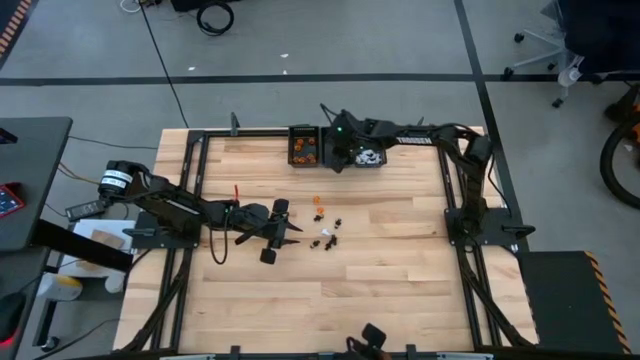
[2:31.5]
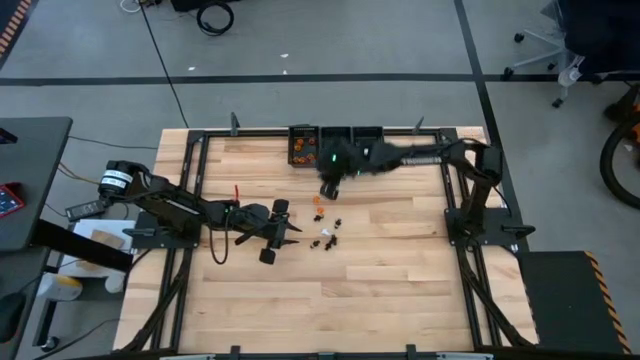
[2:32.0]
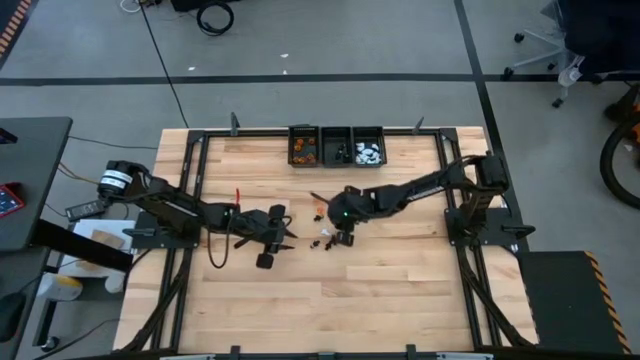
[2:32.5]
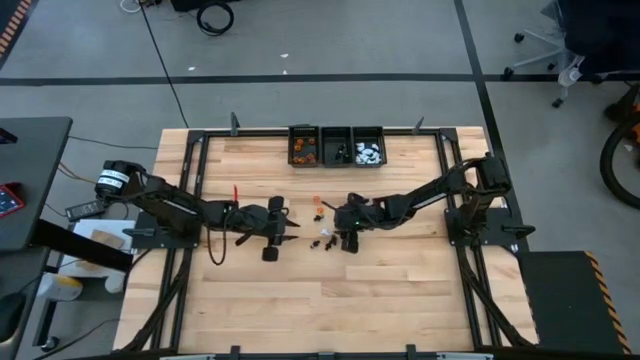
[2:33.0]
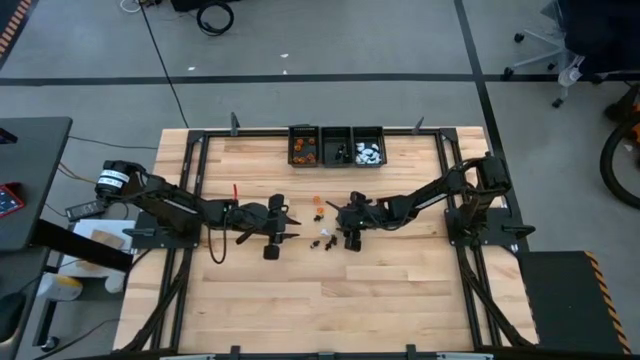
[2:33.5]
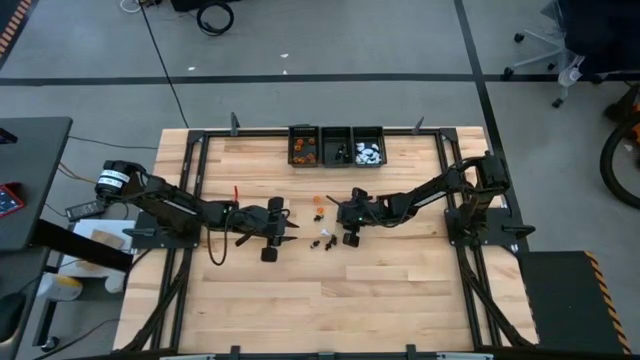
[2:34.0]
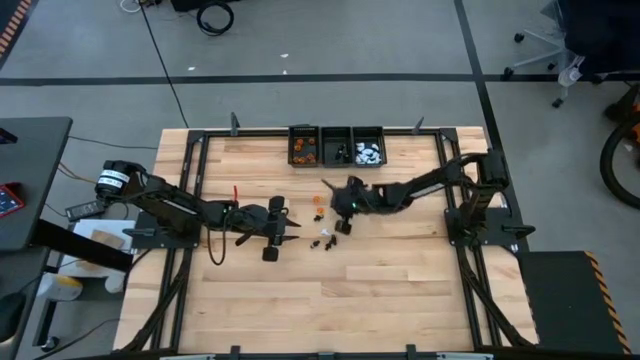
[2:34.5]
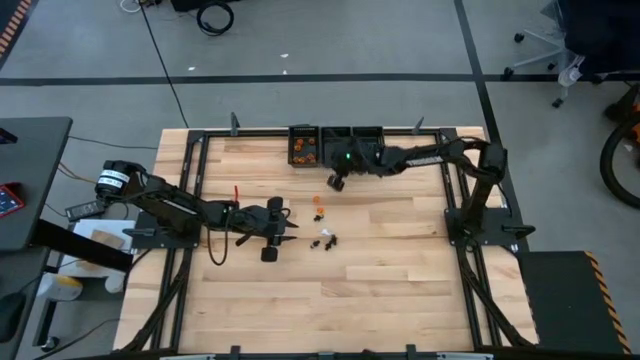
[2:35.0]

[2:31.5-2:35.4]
Task: Sort game pieces by color
Put the black game piece into the center black basket

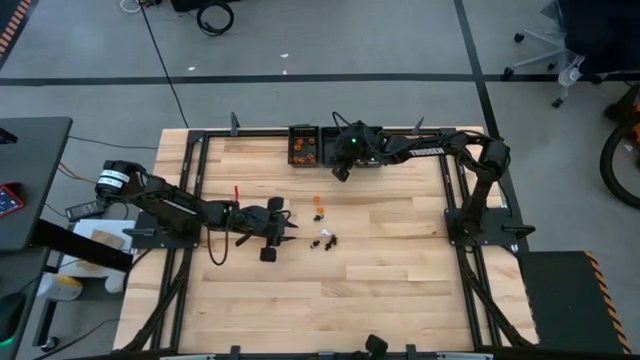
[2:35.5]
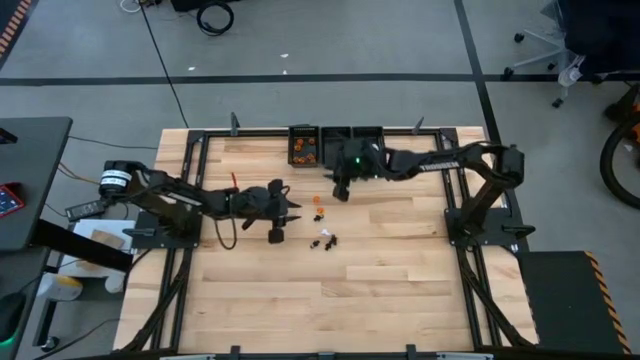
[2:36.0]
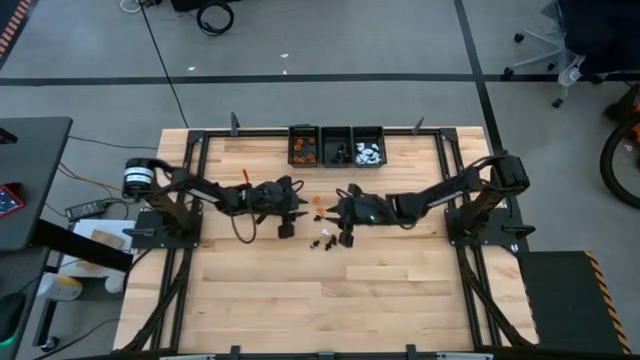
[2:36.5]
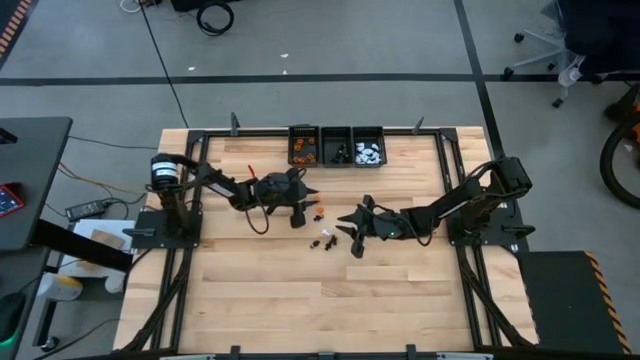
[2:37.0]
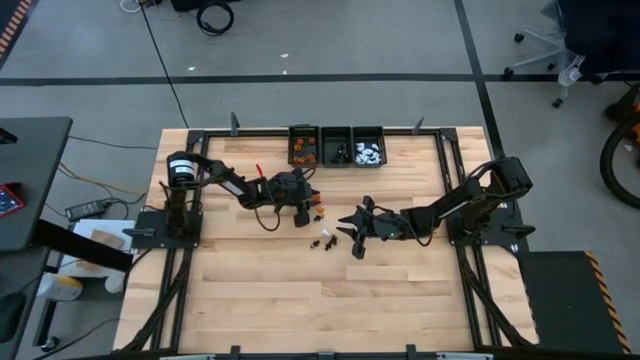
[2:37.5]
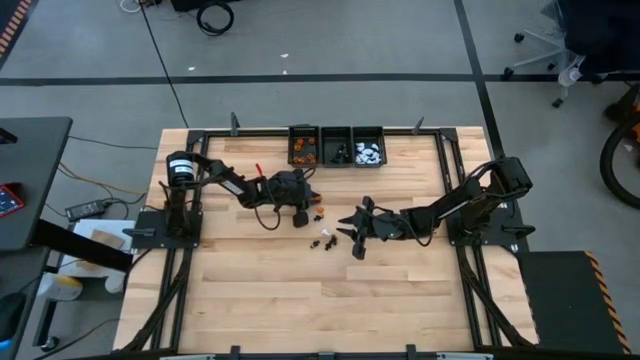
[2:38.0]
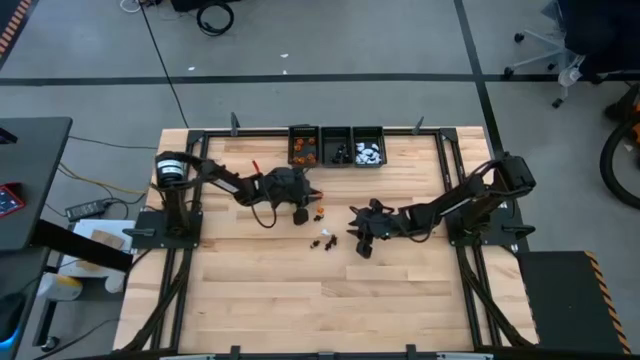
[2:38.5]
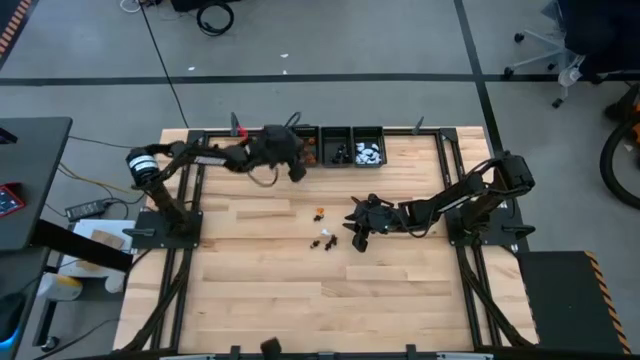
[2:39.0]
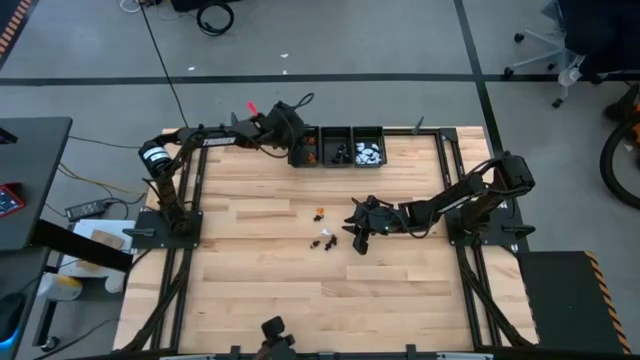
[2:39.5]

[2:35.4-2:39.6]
Put the orange game piece into the left black basket

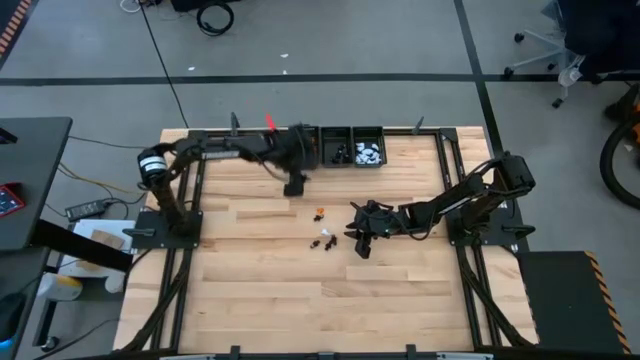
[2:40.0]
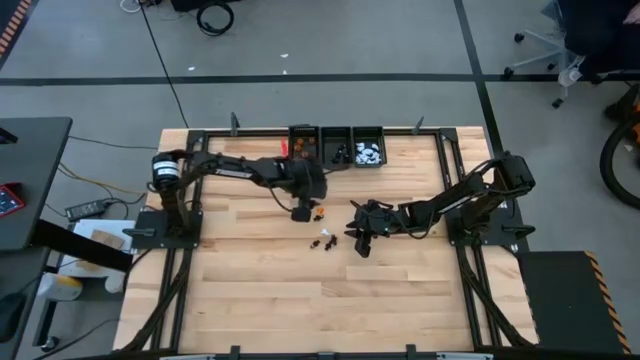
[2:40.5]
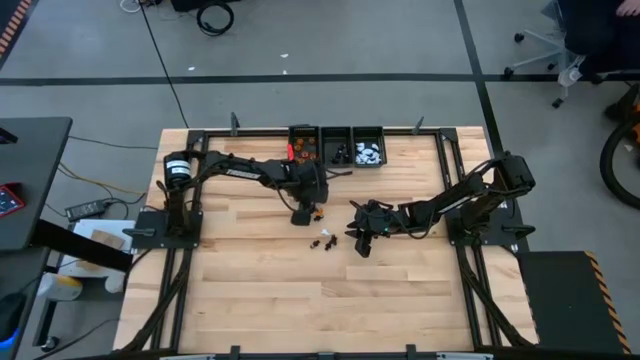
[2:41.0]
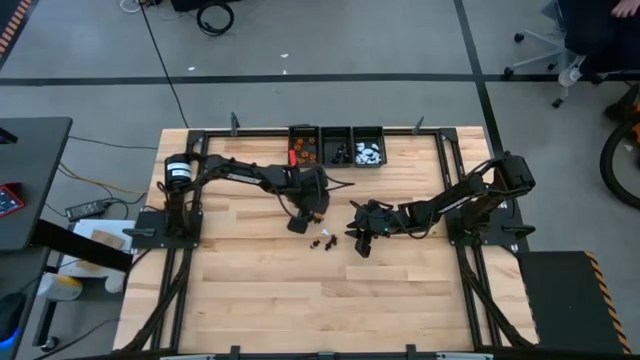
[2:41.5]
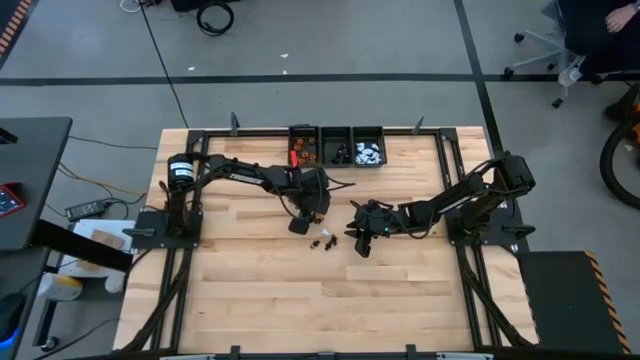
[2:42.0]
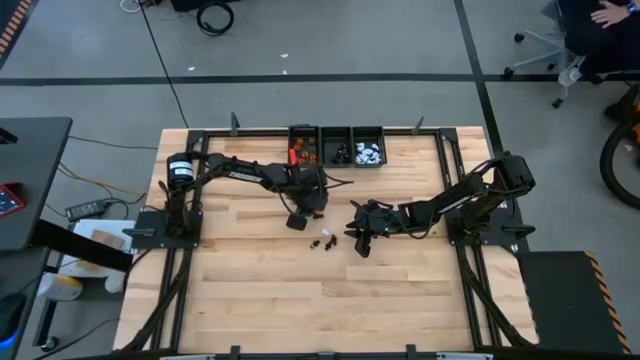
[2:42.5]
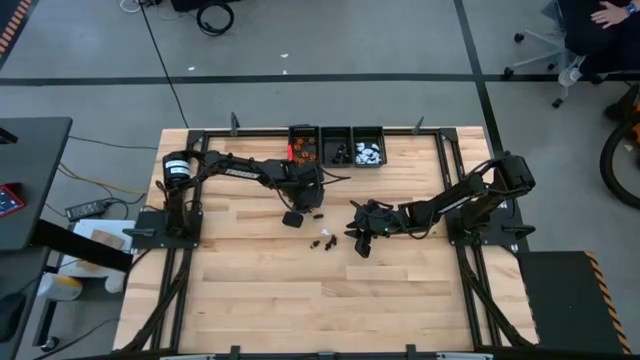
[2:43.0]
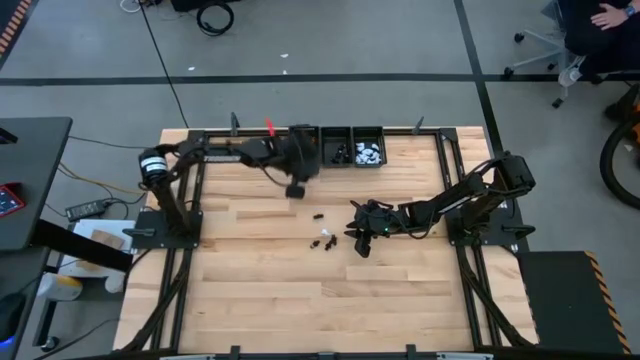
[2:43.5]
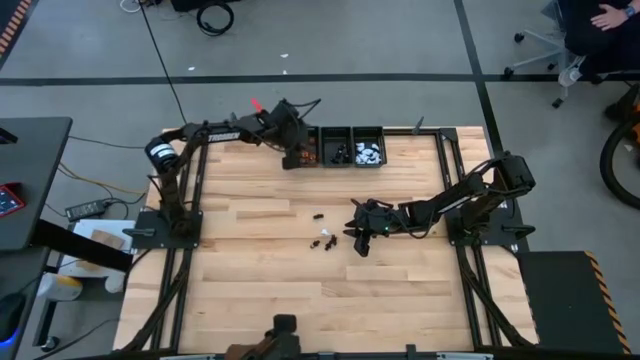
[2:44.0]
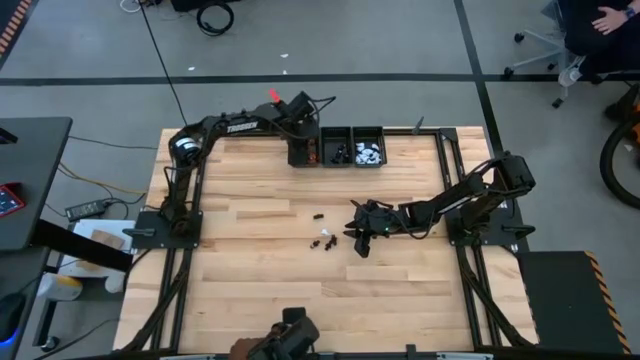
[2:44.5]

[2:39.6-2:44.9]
Put the orange game piece into the left black basket

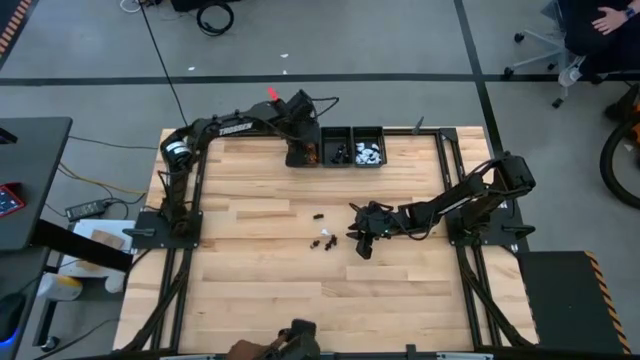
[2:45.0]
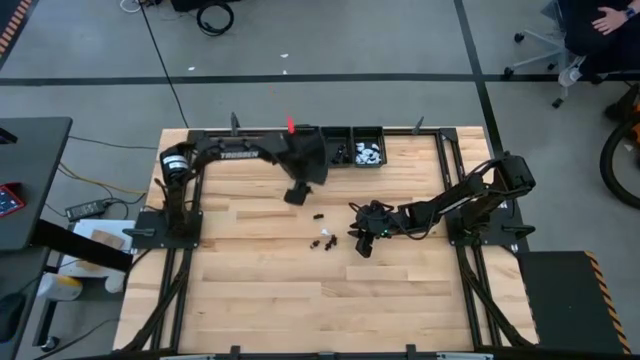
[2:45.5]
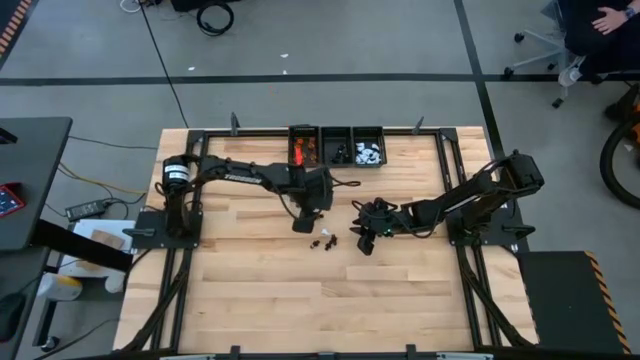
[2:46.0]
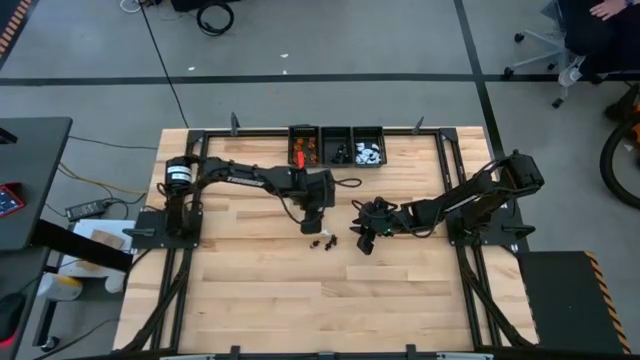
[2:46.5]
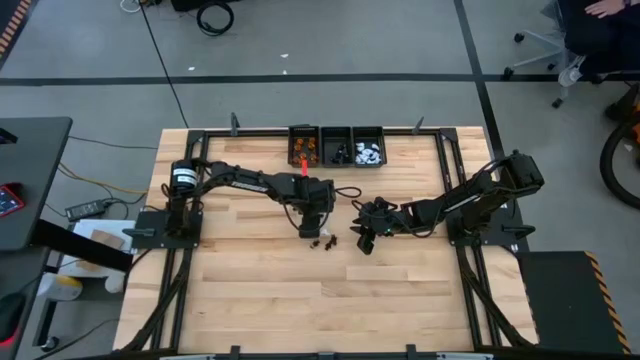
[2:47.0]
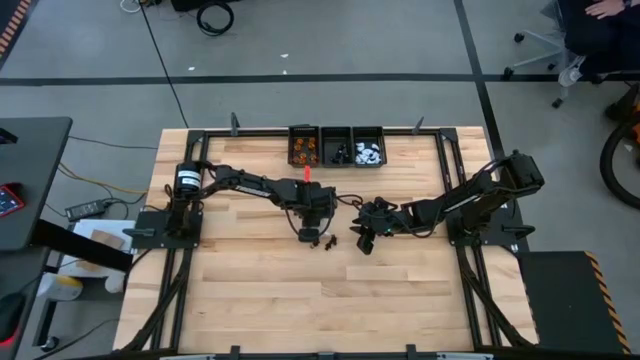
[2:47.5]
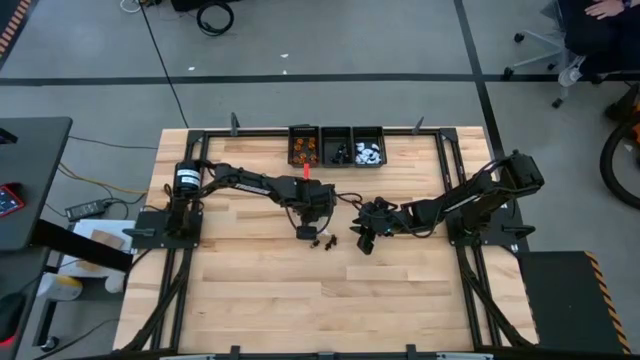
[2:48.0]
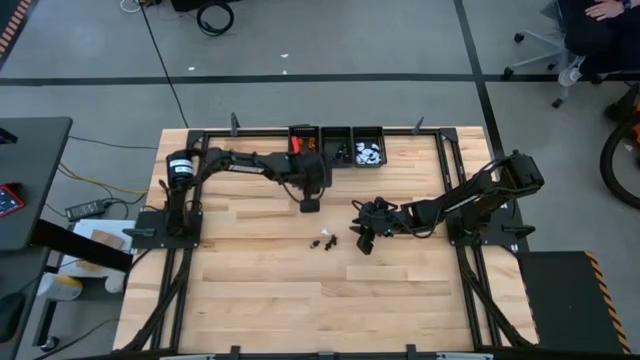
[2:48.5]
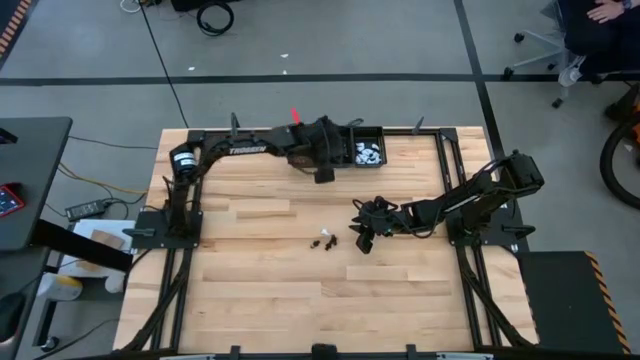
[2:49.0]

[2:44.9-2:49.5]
Put the black game piece into the center black basket

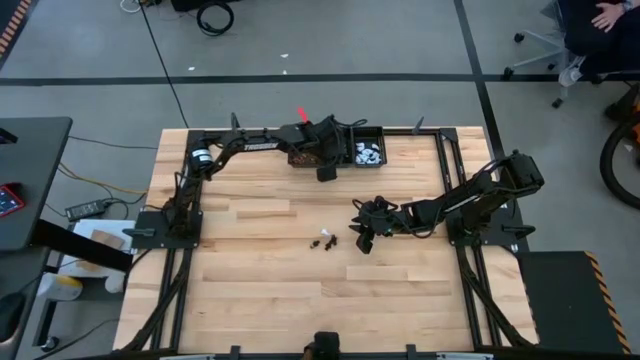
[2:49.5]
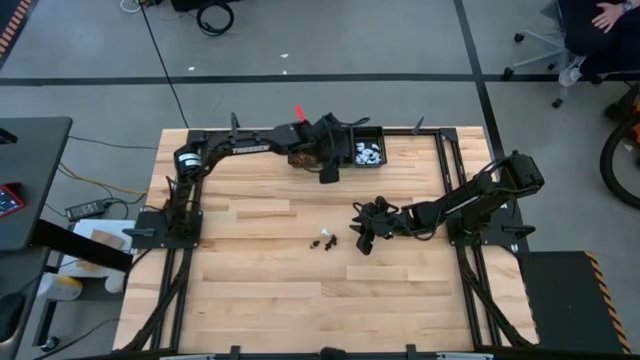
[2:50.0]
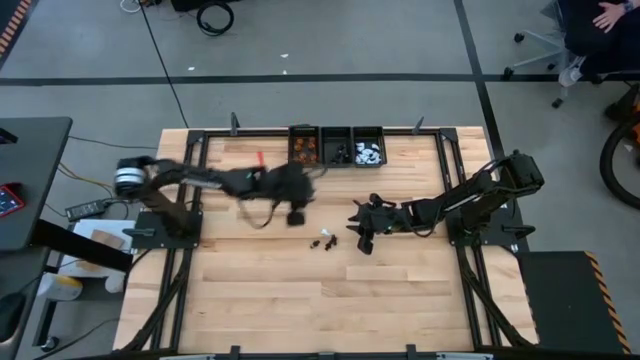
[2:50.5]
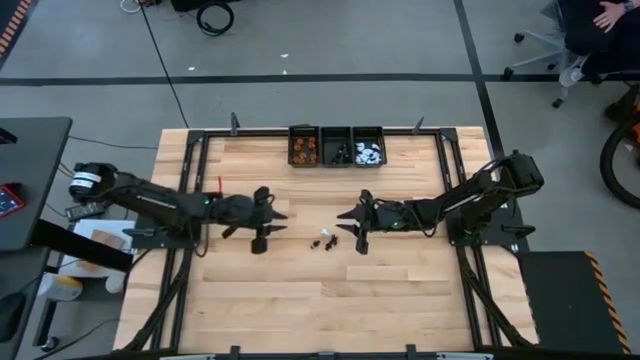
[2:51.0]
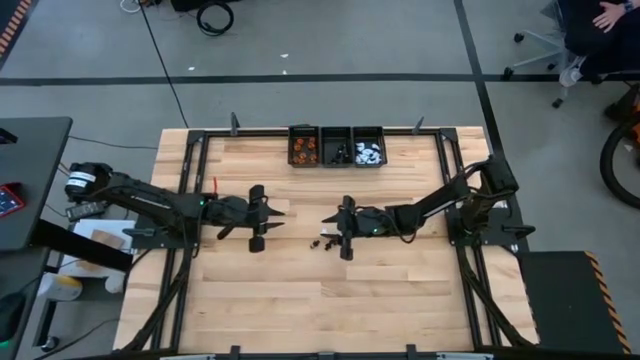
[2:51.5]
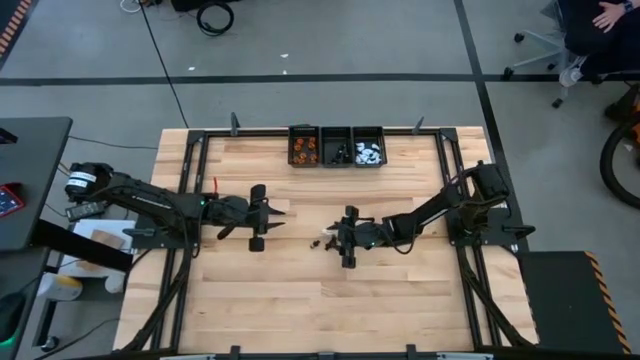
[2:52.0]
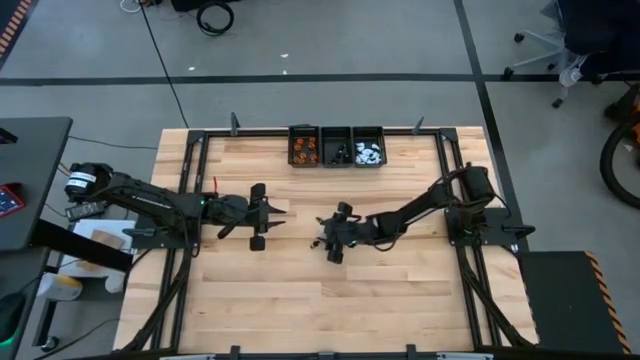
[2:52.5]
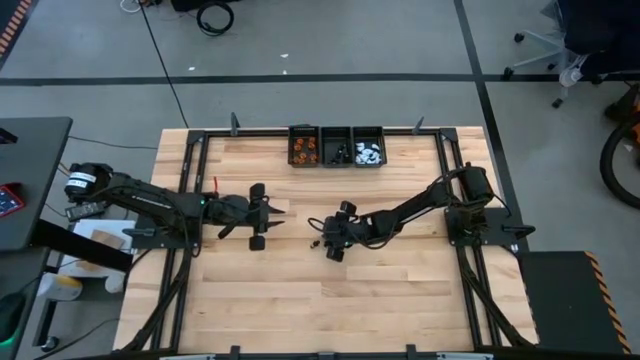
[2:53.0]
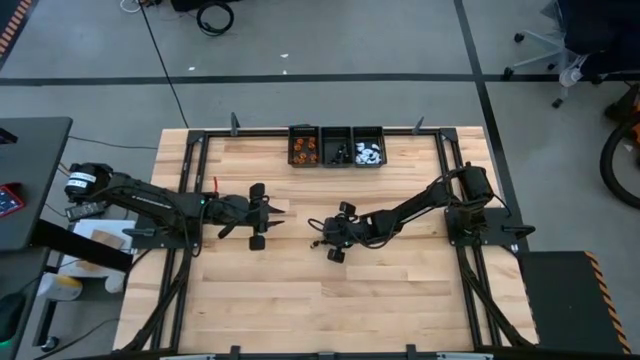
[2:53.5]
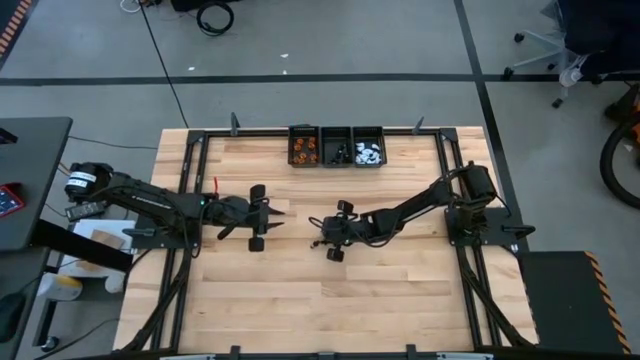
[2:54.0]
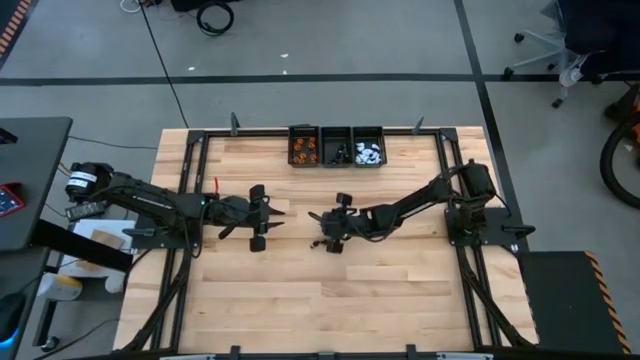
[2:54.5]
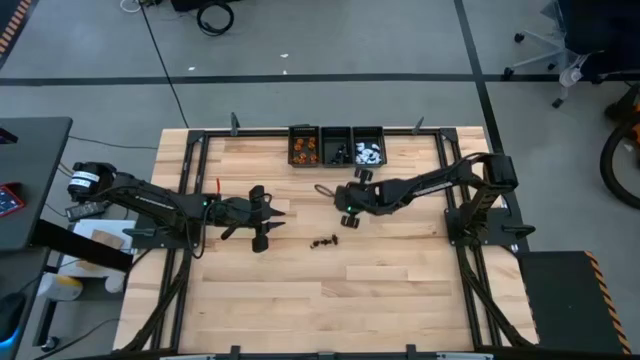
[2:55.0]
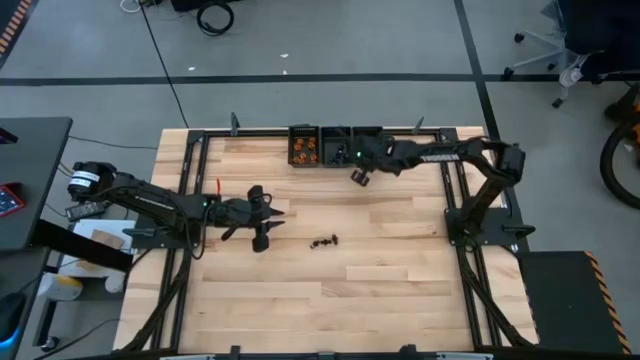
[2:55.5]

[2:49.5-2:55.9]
Put the white game piece into the right black basket
